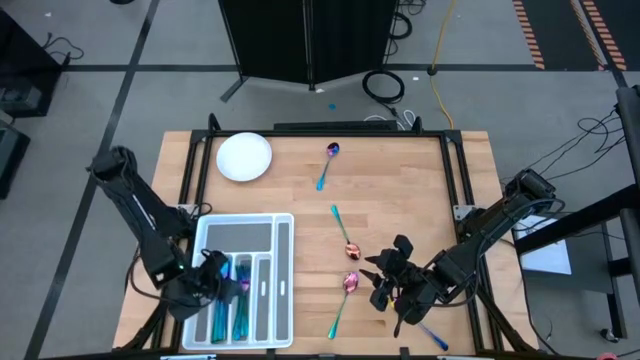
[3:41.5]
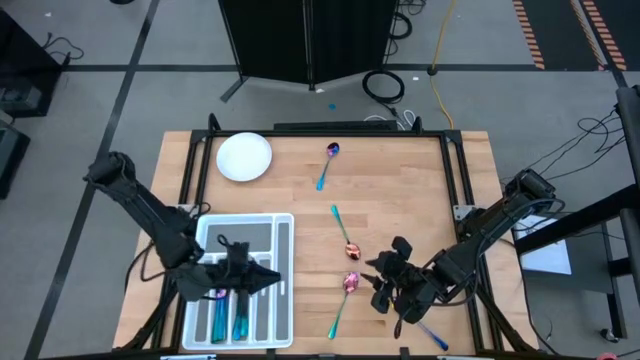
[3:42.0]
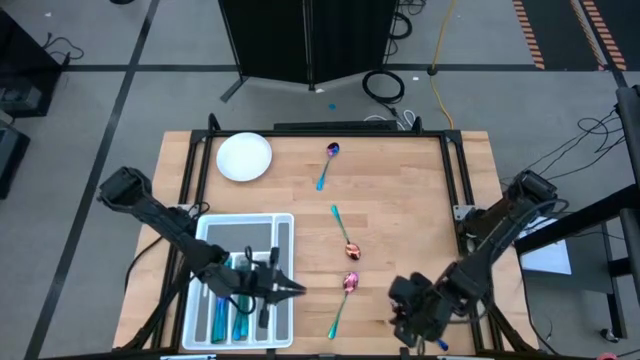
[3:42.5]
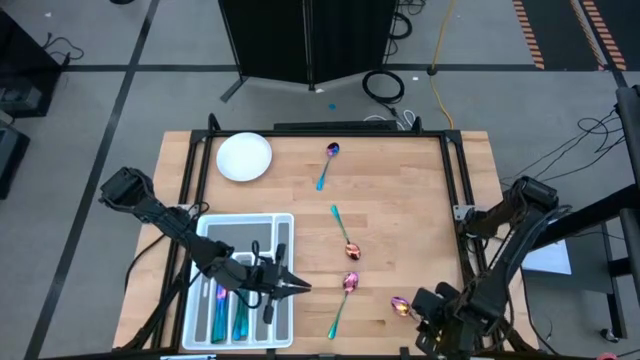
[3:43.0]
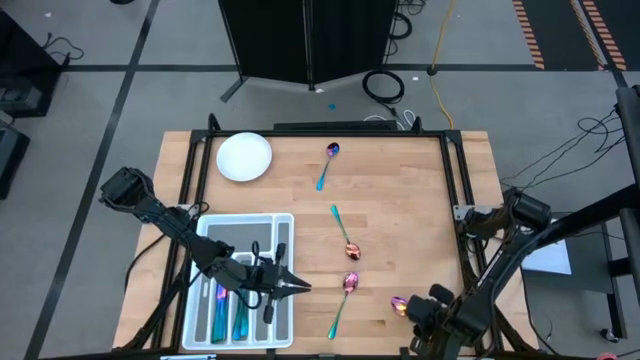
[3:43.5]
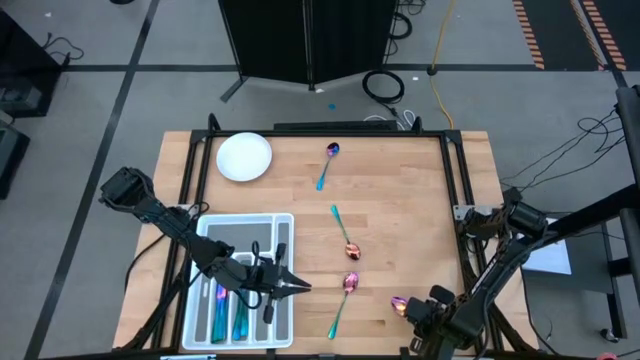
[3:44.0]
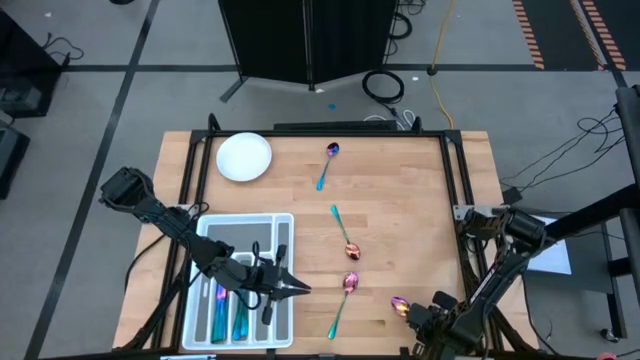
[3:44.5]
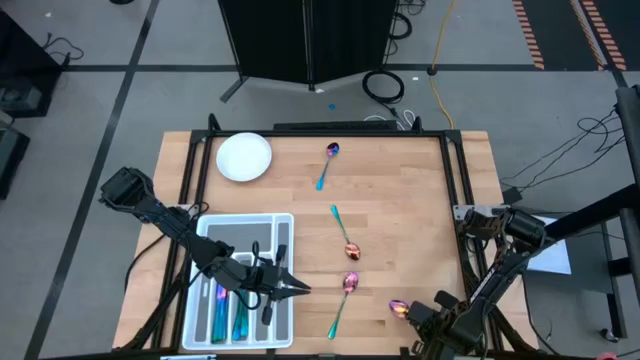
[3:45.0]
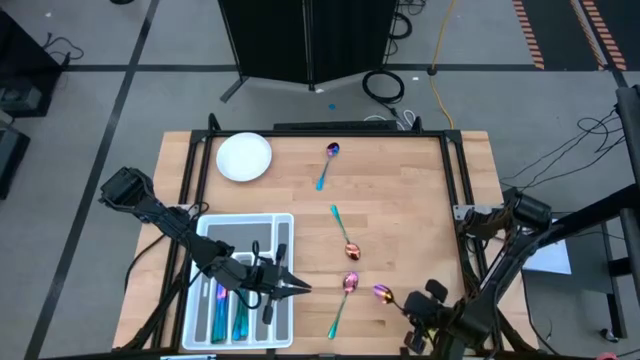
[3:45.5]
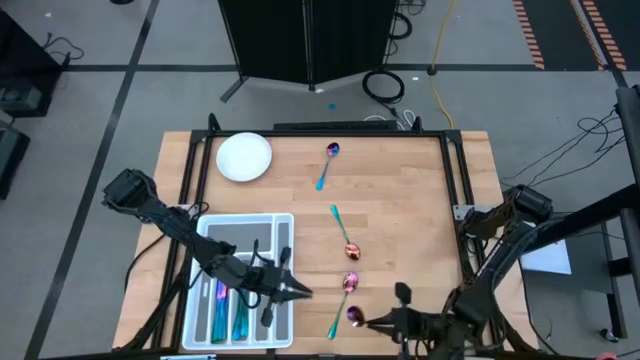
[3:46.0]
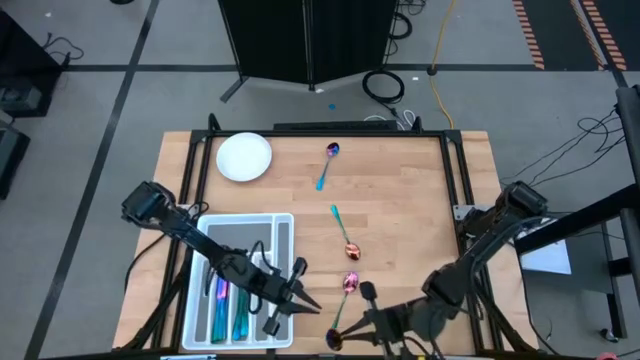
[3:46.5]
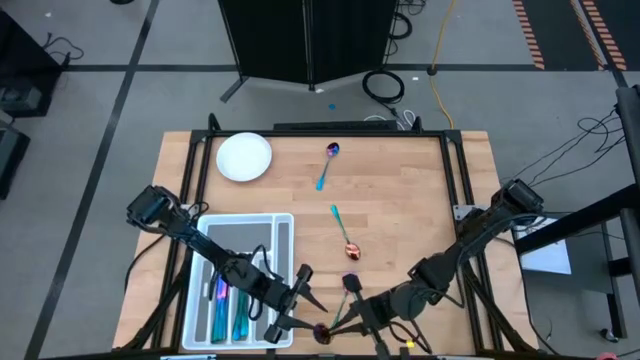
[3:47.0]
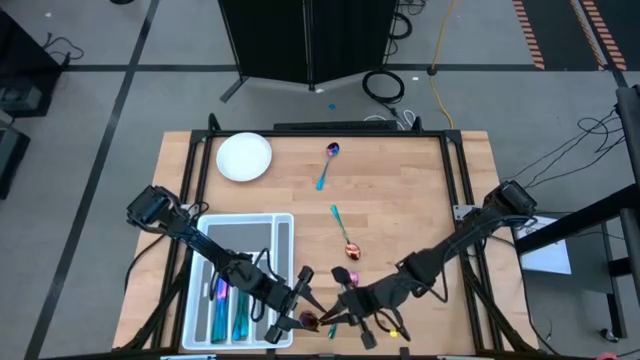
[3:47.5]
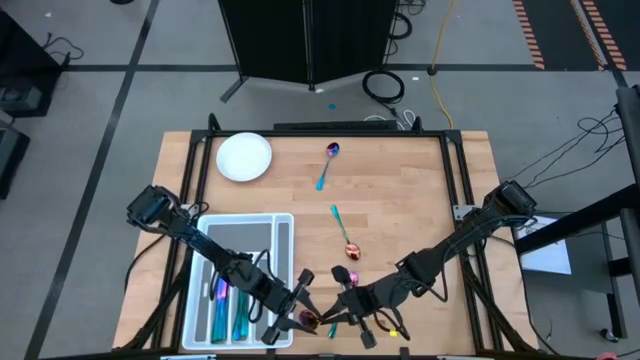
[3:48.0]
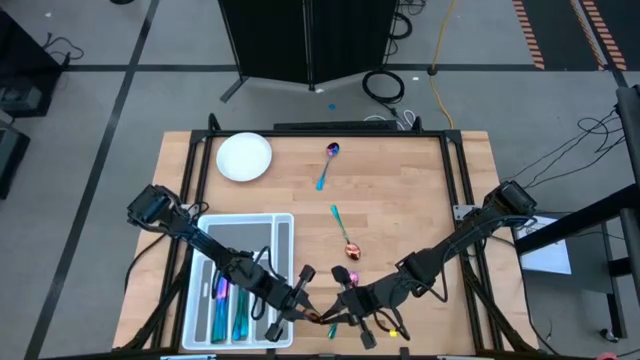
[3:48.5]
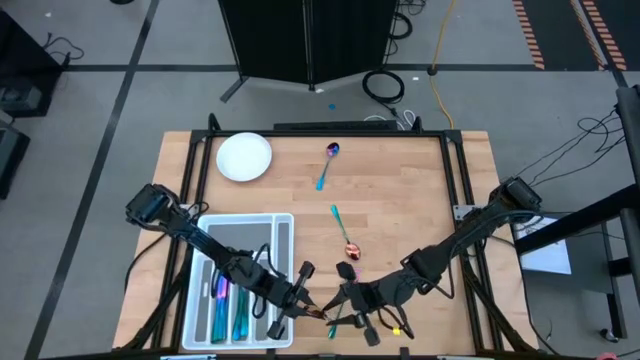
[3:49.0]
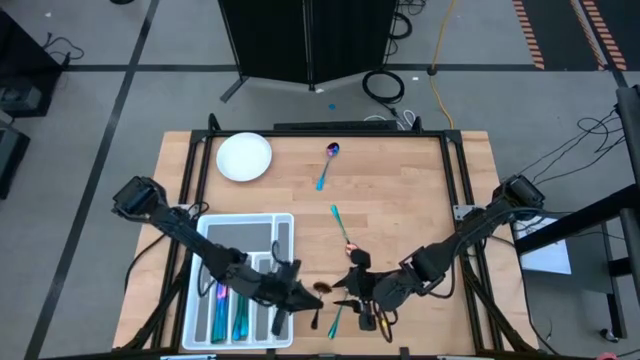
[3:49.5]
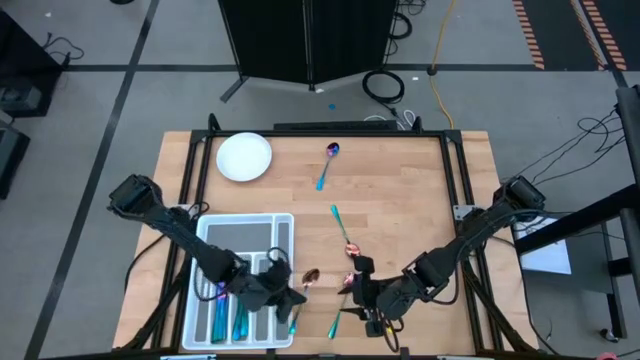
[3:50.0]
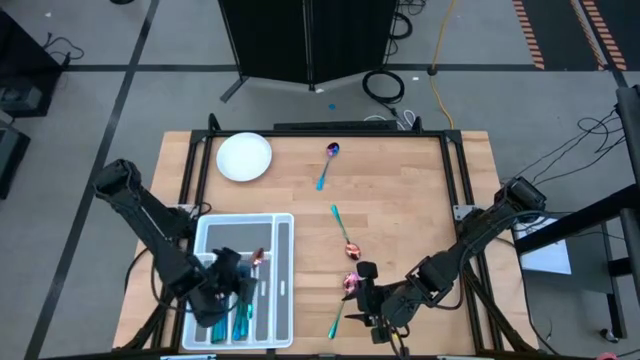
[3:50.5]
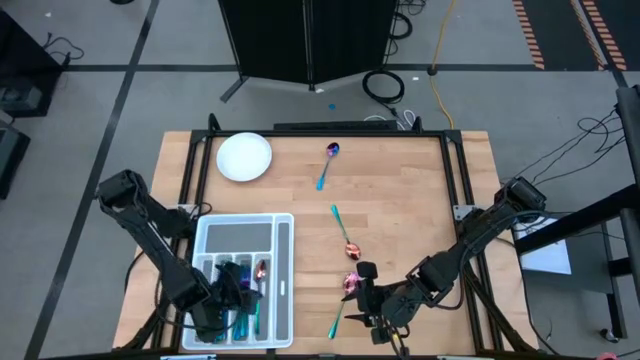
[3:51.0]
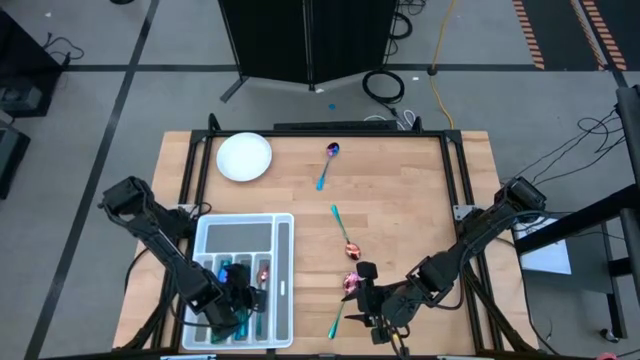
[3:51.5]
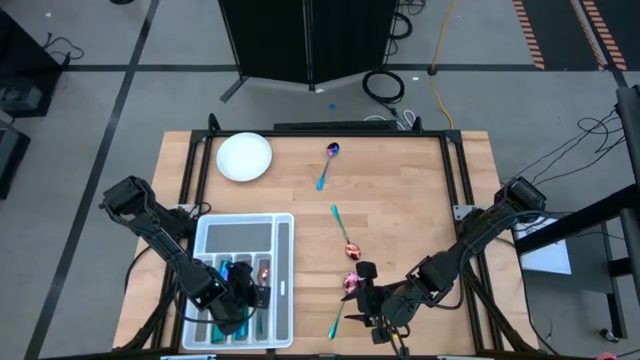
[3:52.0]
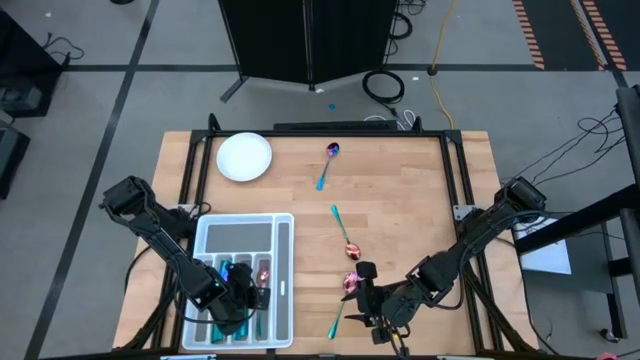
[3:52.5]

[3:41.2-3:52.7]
Task: Sort silverware
Put the iridescent blue spoon in the right slot of the silverware tray

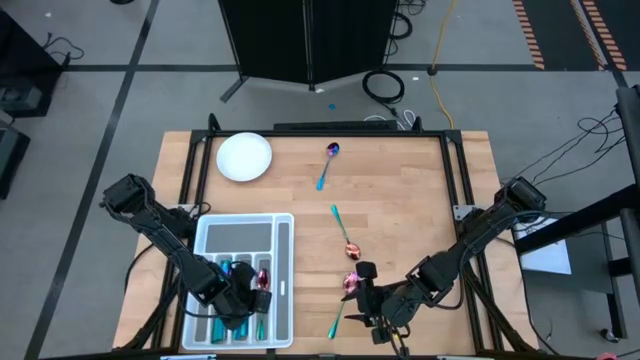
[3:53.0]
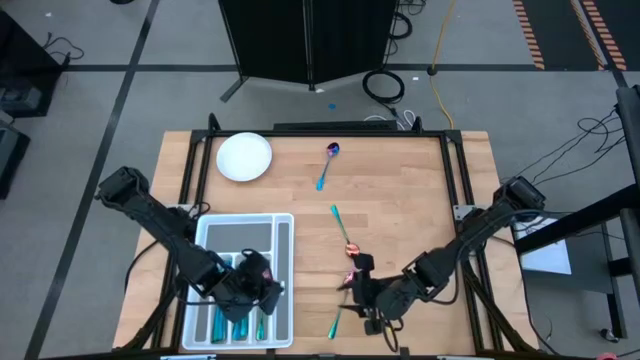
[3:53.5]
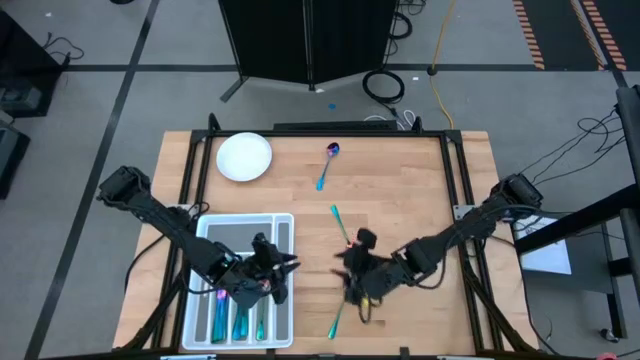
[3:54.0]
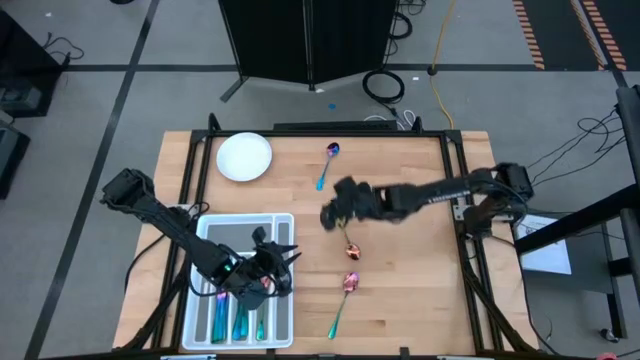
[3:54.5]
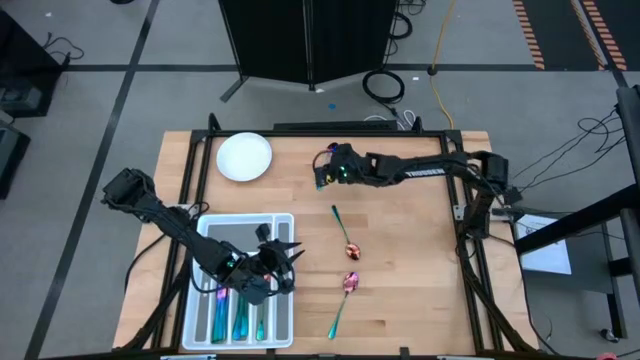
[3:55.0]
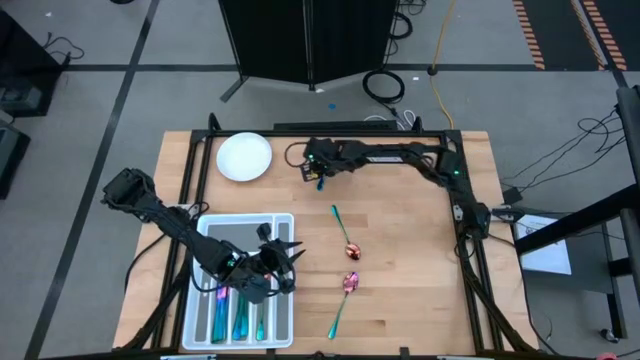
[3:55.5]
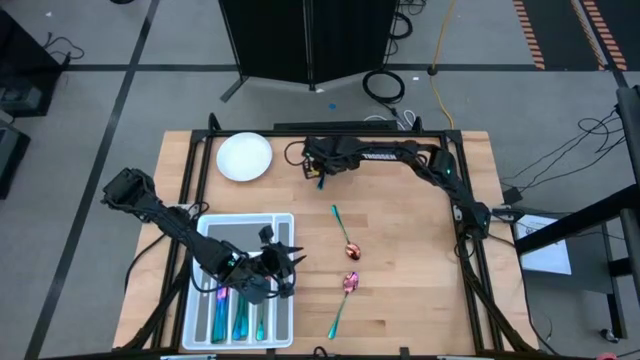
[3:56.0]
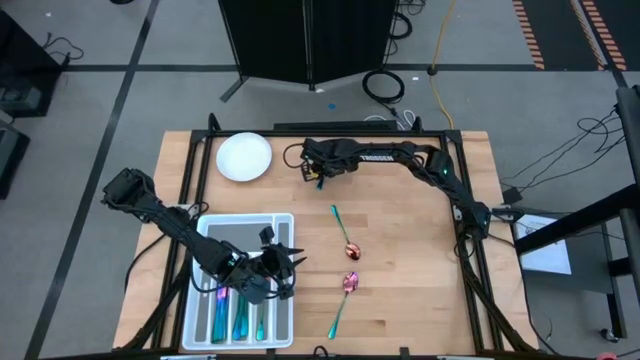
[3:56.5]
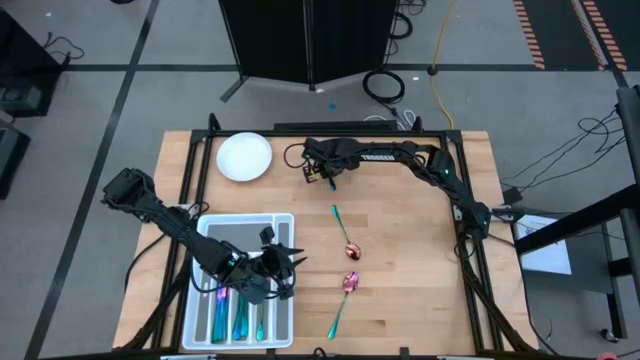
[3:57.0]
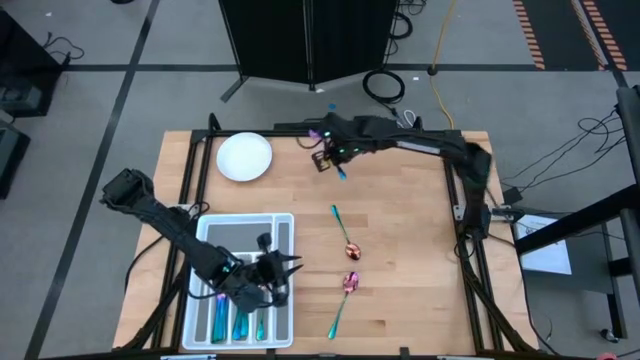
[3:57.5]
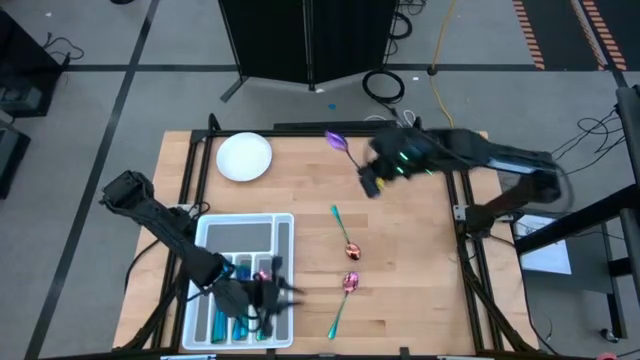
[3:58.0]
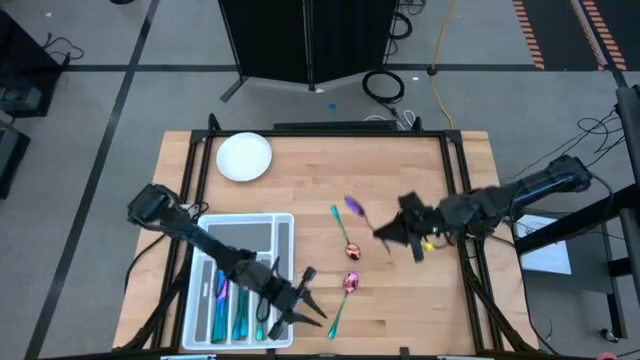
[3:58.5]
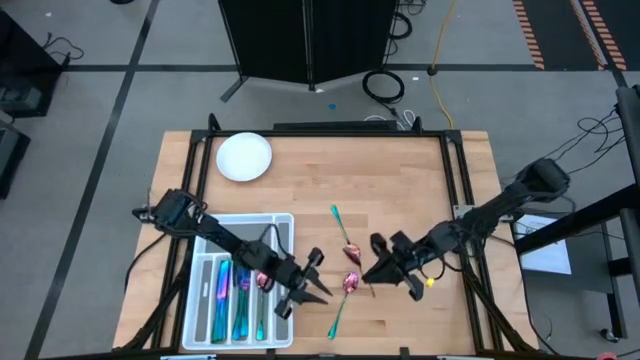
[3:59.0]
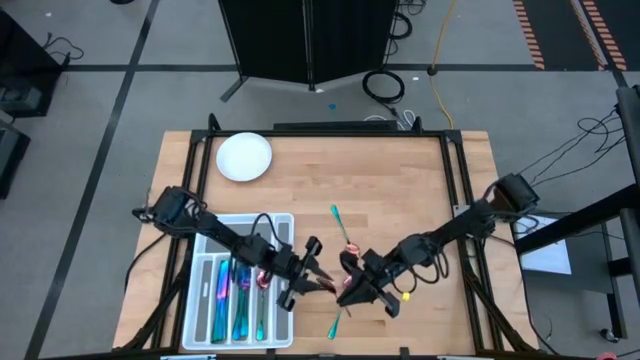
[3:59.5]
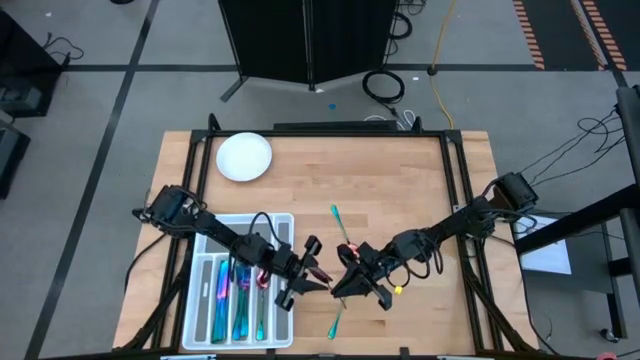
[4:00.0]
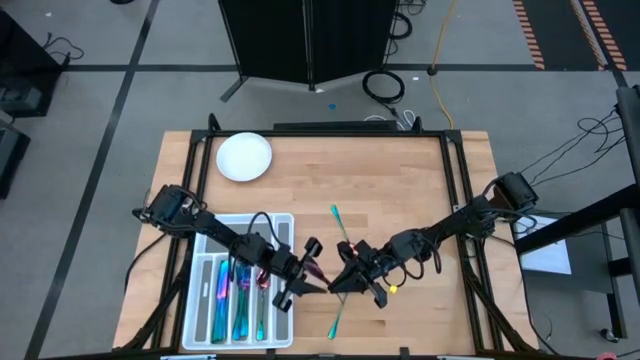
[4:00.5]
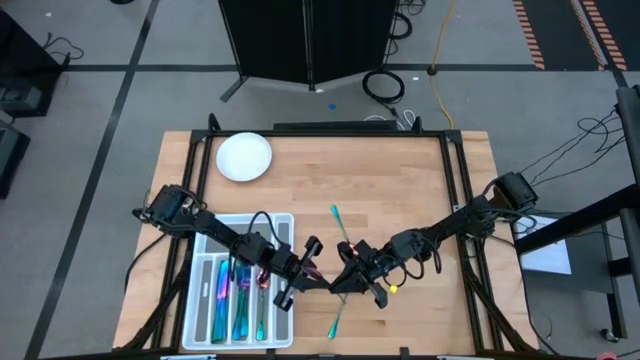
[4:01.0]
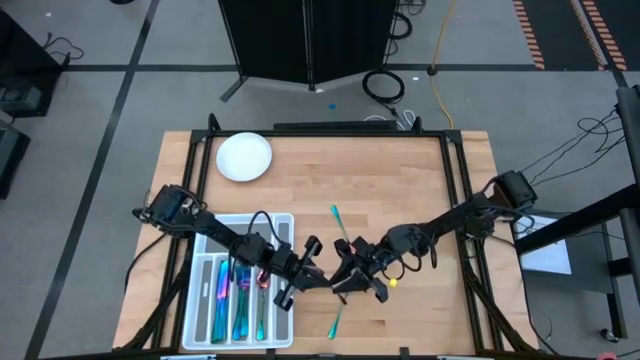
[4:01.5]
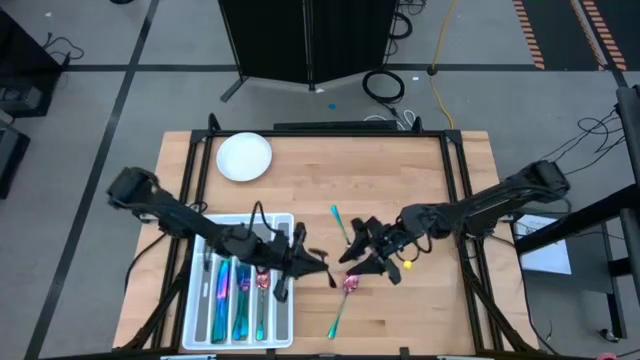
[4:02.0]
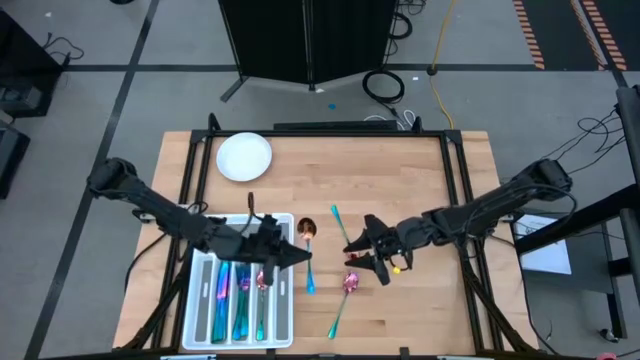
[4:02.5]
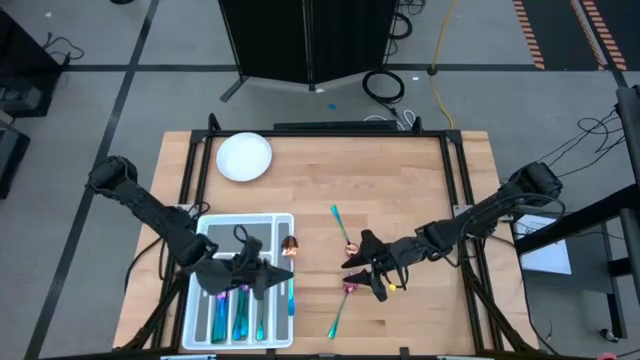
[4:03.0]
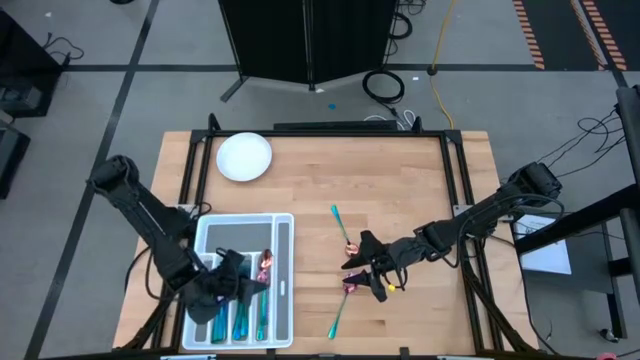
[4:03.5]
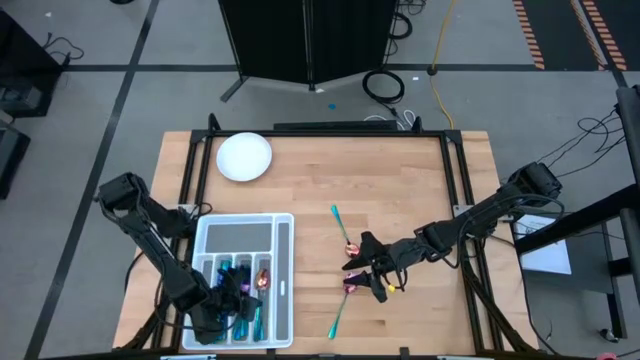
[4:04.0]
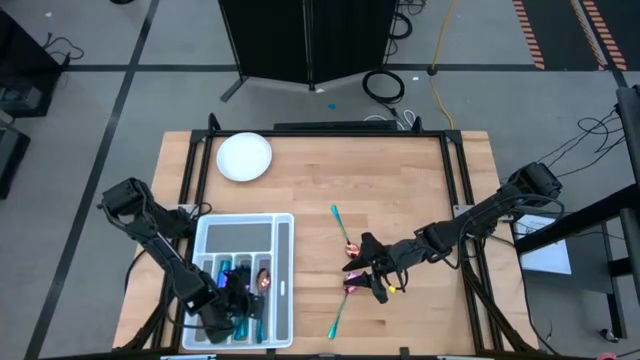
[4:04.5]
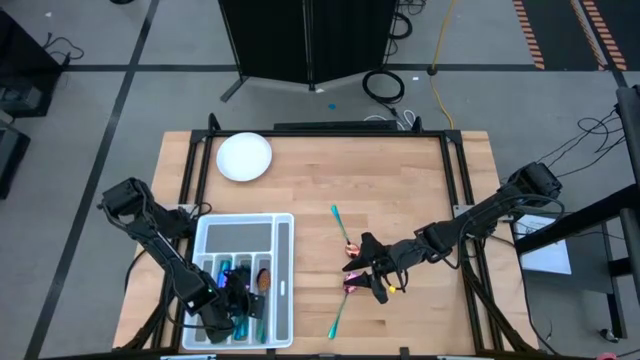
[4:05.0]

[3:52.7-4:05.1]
Put the iridescent blue spoon in the silverware tray
